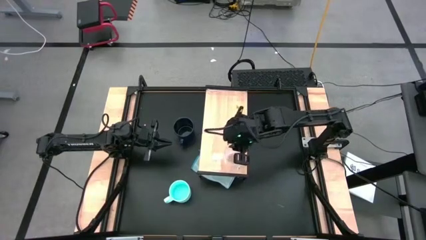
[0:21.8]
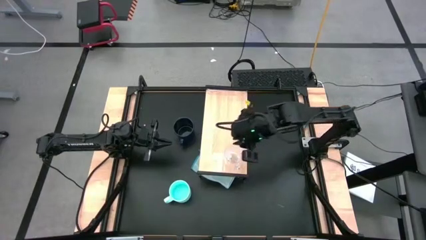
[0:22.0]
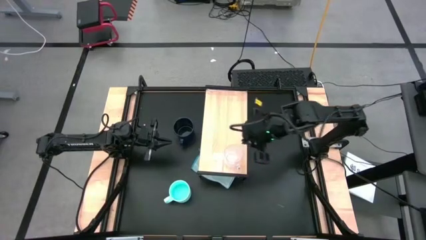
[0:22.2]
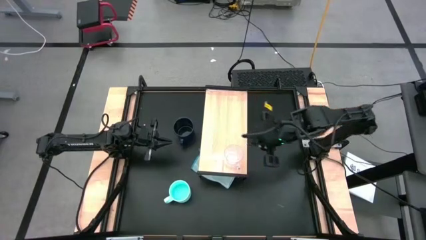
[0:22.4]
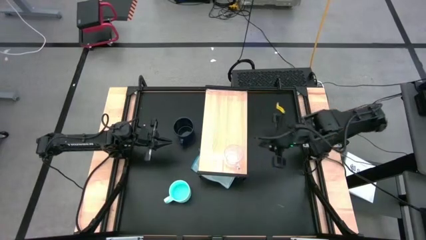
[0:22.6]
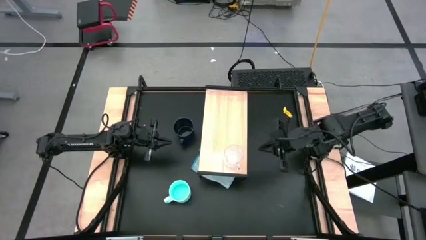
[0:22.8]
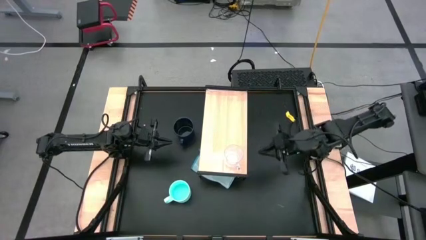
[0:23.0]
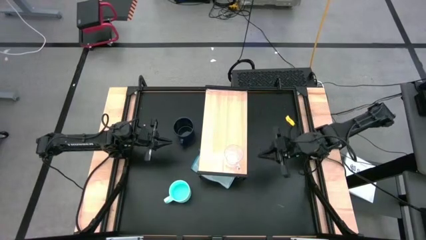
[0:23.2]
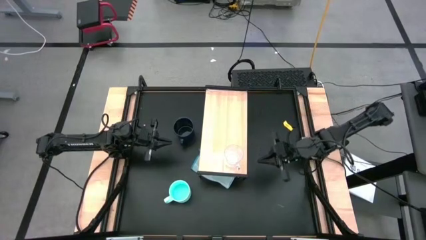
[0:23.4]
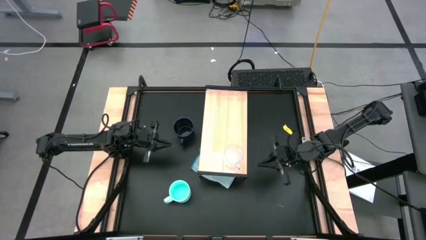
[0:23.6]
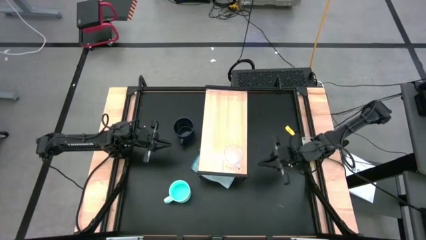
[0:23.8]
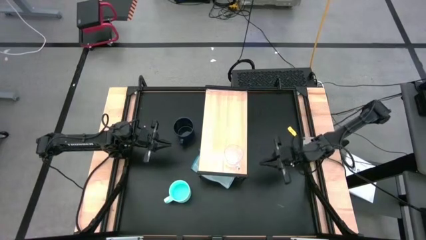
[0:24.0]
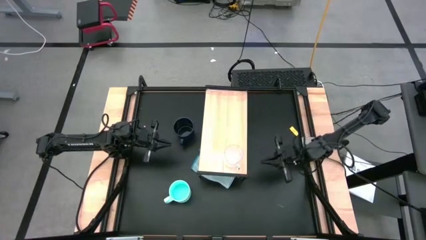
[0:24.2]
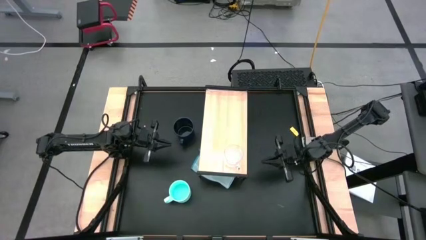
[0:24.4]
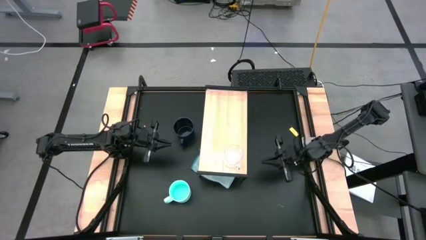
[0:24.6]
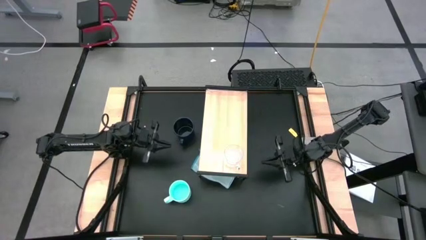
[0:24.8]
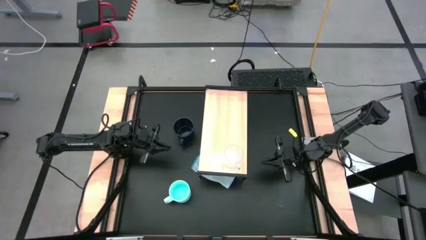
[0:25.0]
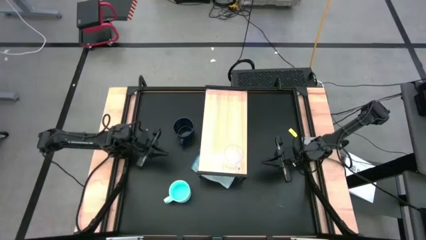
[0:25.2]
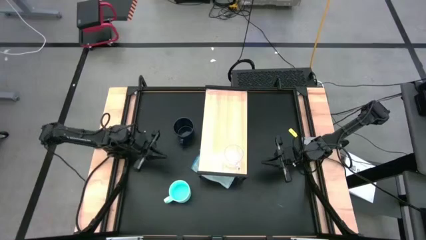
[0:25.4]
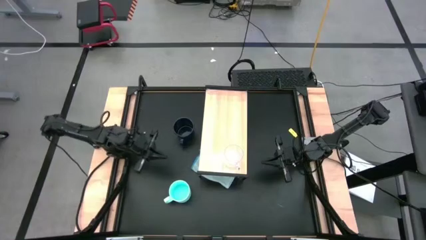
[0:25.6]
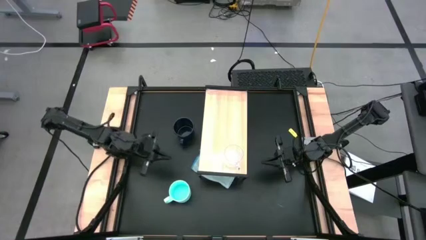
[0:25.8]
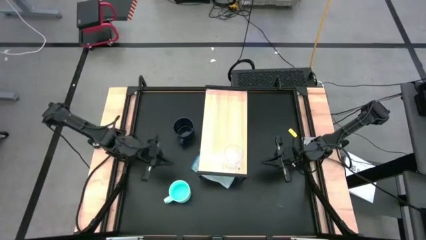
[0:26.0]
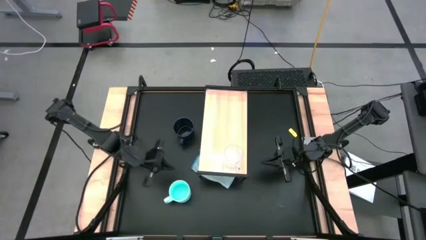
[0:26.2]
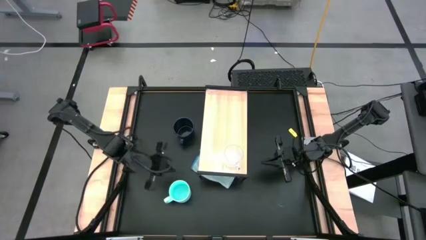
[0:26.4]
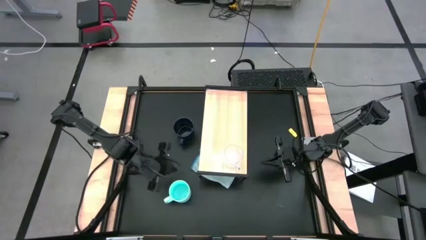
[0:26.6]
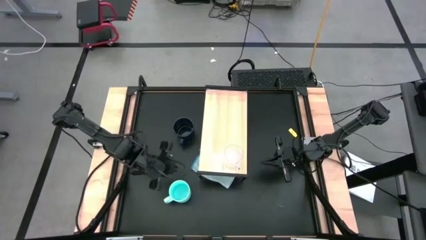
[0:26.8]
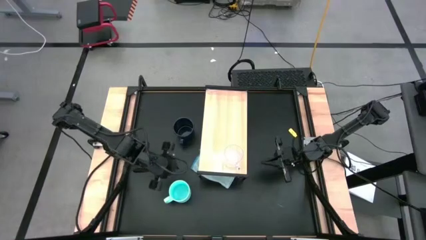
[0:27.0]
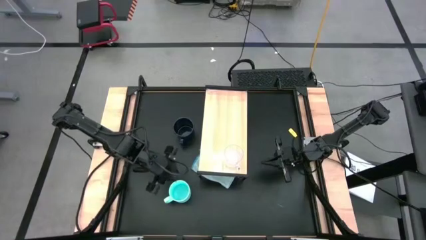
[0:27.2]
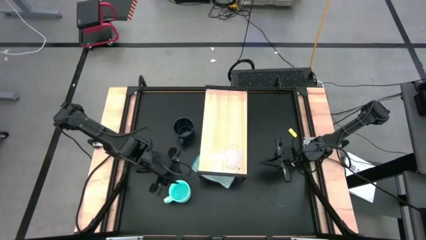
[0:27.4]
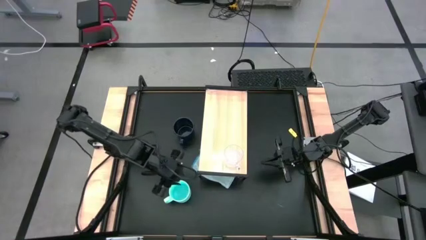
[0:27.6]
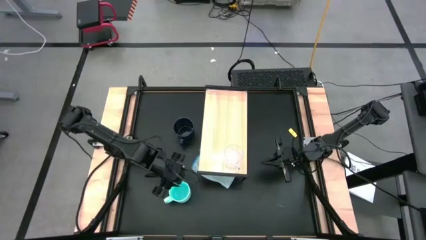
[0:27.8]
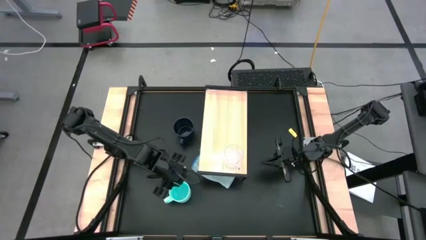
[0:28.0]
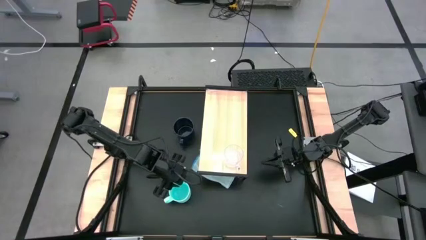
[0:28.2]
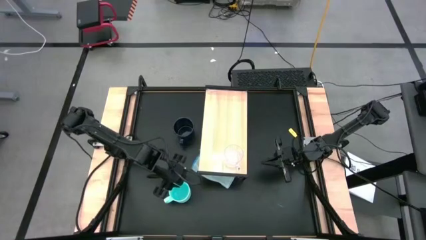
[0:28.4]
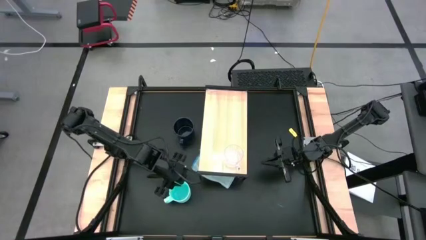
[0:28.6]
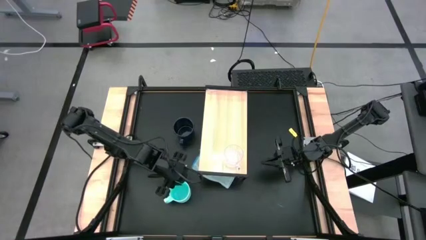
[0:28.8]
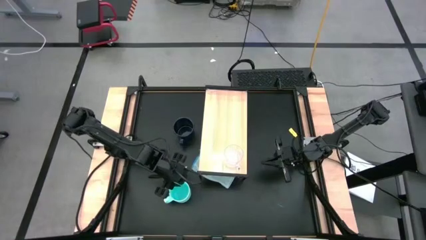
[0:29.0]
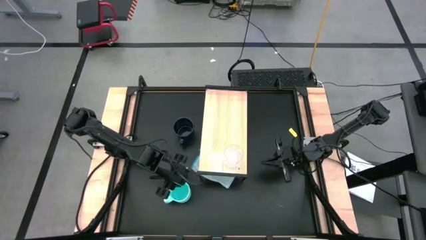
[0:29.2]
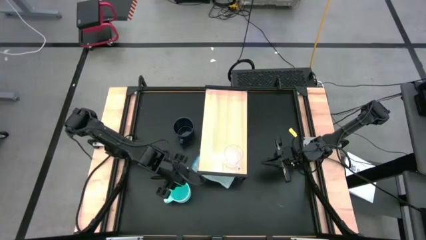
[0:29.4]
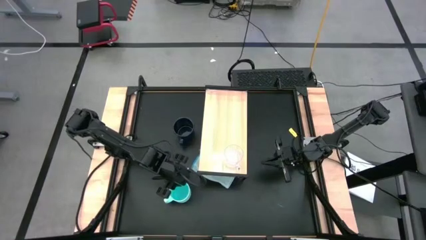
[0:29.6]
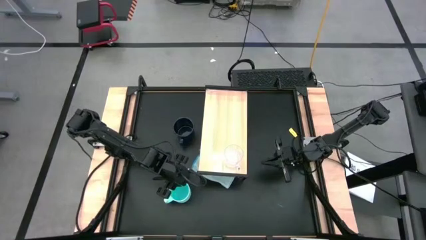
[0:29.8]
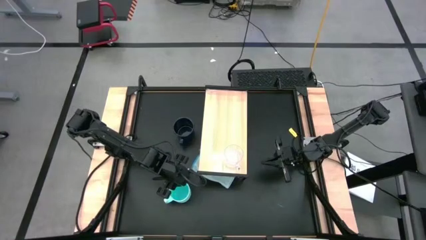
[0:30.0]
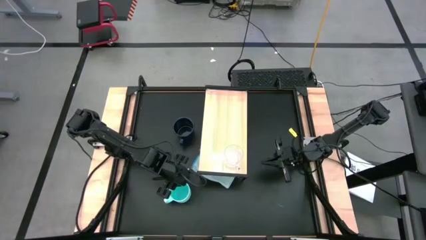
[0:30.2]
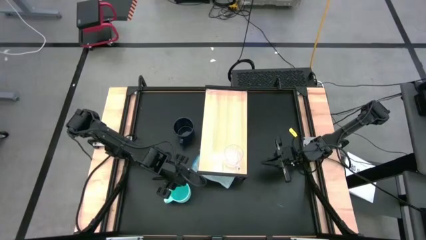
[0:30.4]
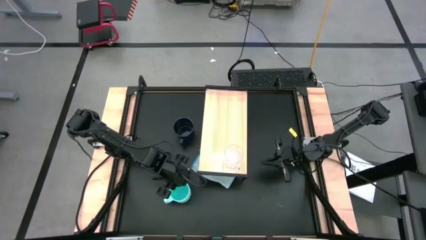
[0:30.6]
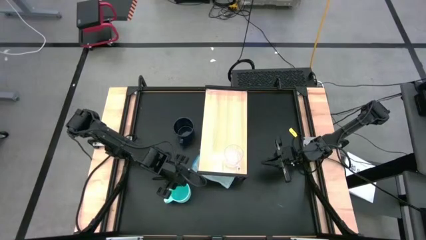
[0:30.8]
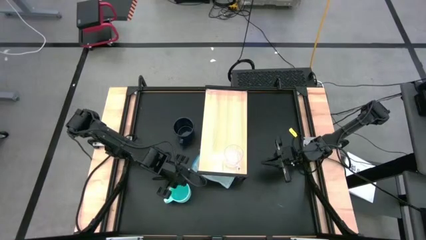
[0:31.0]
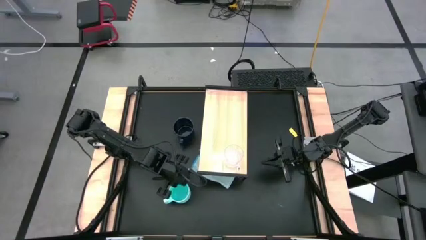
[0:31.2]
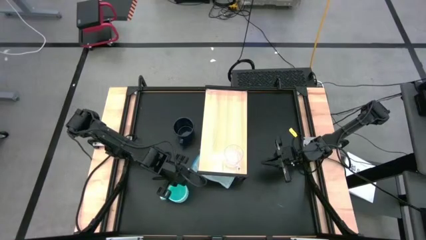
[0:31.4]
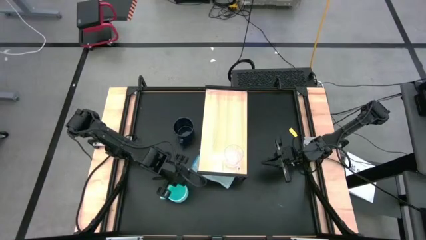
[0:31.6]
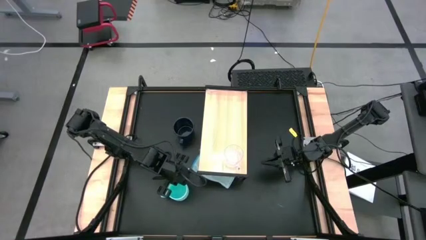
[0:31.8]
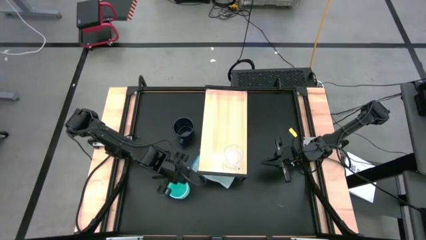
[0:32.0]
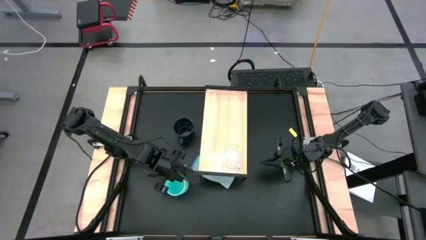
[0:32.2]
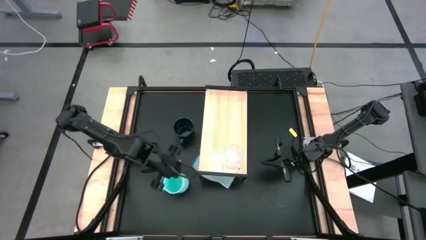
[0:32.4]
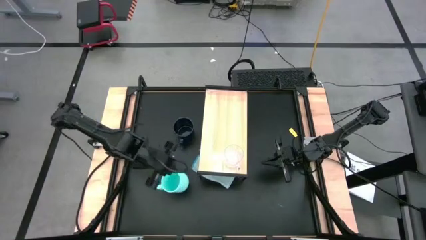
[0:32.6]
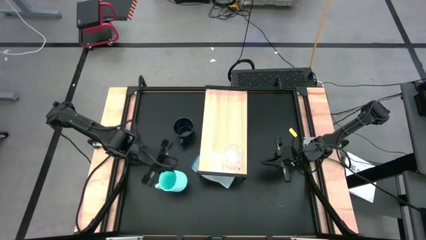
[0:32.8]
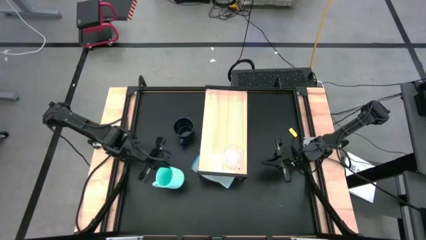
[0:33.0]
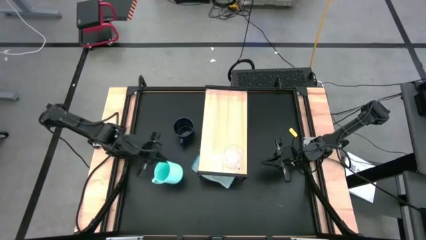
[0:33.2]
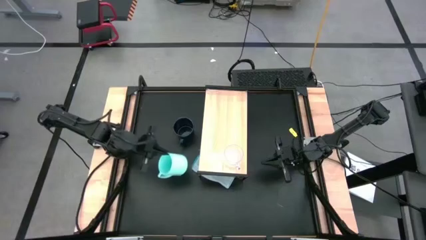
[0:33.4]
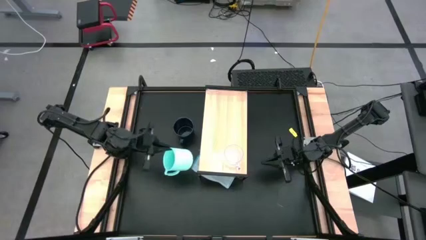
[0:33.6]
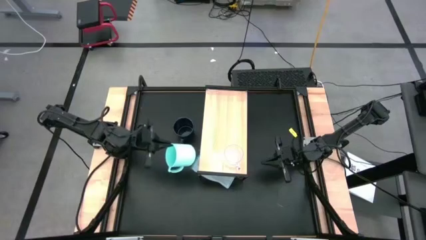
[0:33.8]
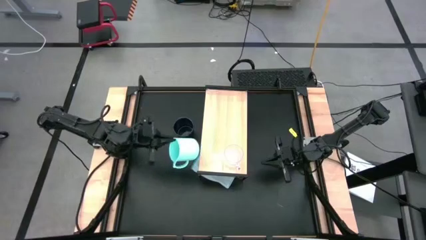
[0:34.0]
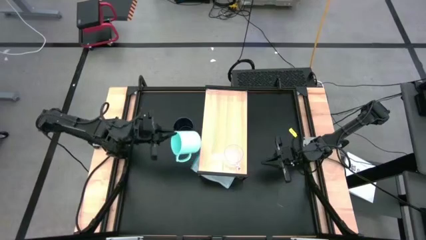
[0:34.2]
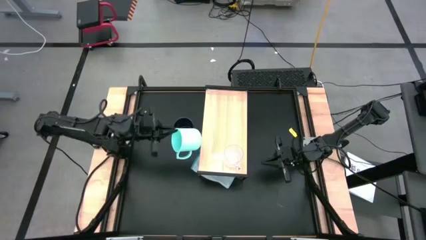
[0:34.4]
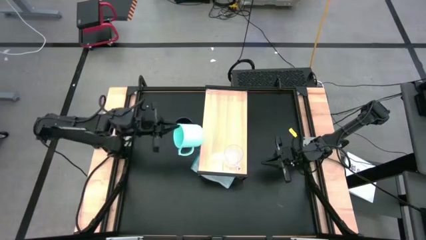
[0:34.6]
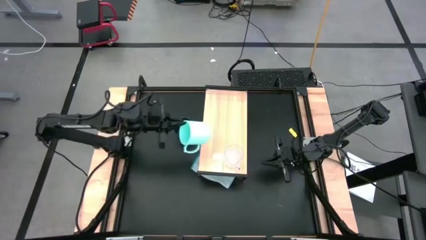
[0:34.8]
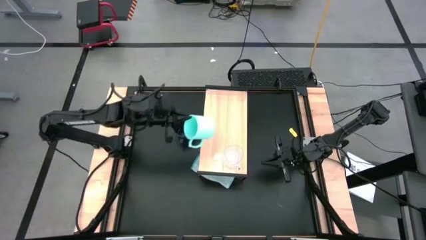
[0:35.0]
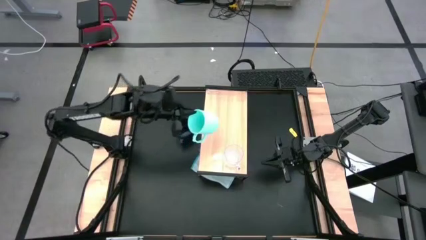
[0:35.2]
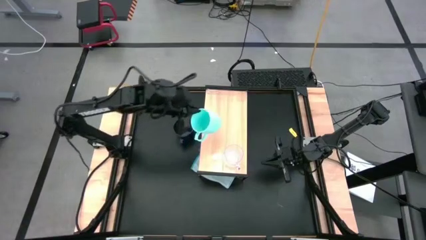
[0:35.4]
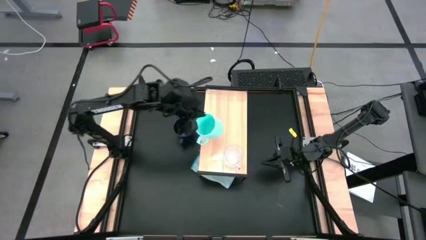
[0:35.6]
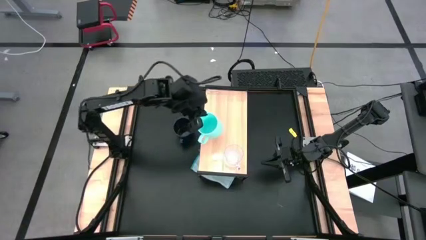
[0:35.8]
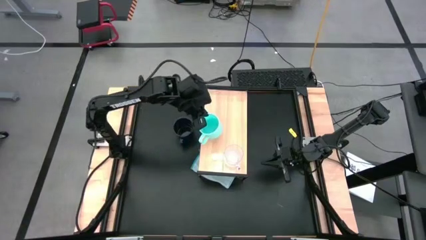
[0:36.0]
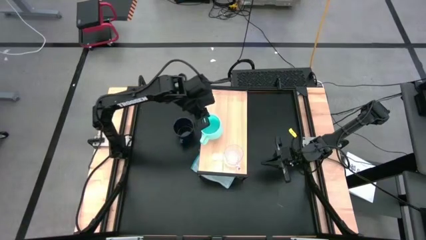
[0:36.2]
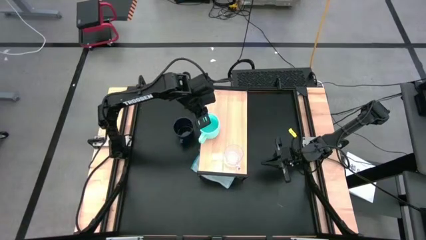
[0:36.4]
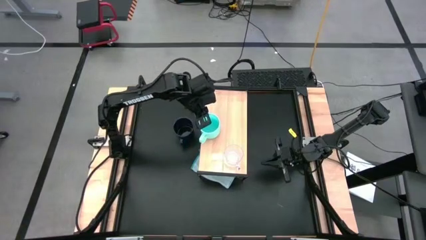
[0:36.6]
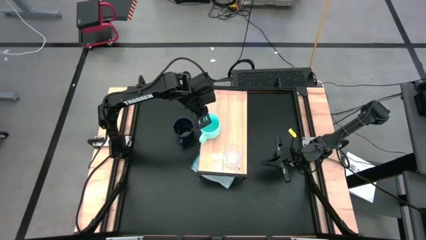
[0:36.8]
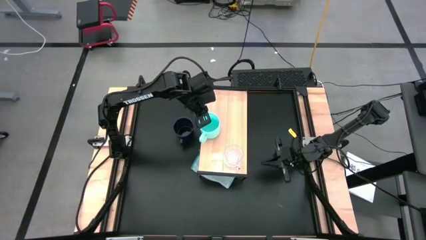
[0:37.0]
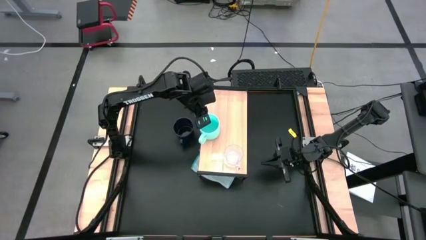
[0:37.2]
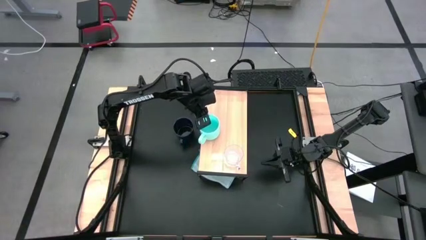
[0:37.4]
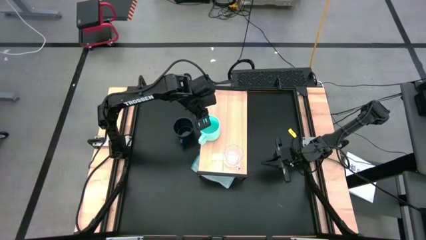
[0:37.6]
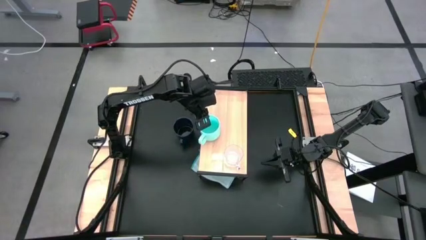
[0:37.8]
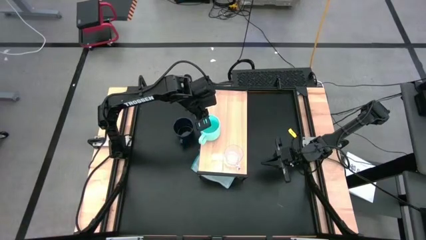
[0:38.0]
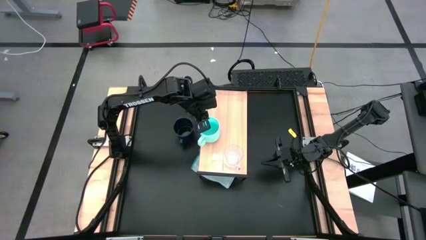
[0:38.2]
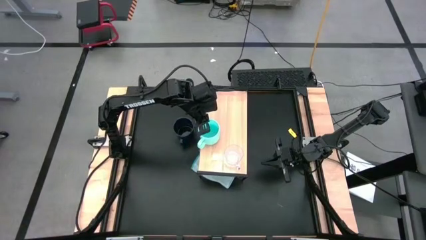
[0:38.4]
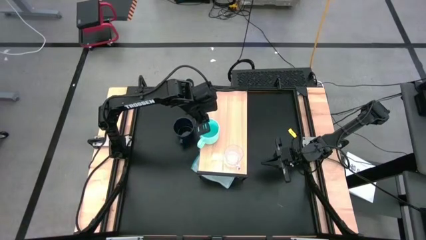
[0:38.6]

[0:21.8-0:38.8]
Task: Stack small to large cups/mugs on shelf
Put the light blue mug on the shelf
